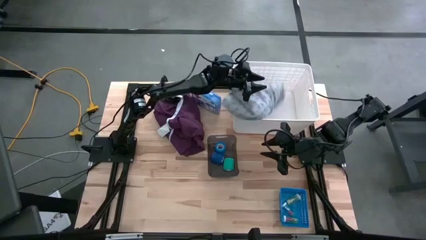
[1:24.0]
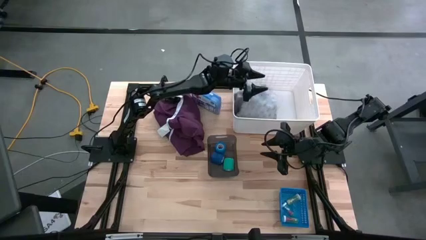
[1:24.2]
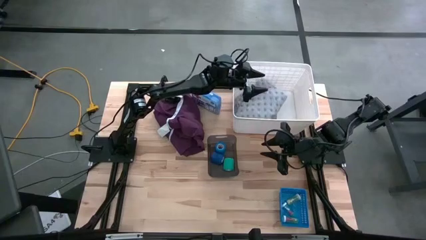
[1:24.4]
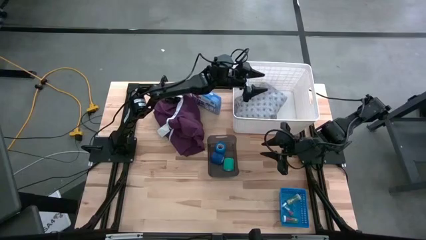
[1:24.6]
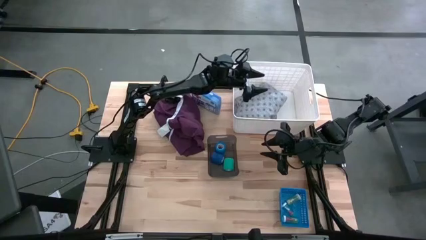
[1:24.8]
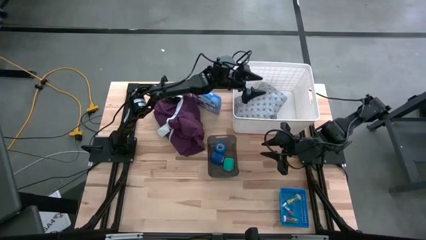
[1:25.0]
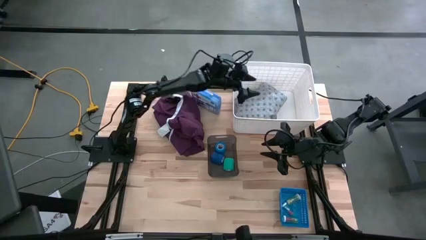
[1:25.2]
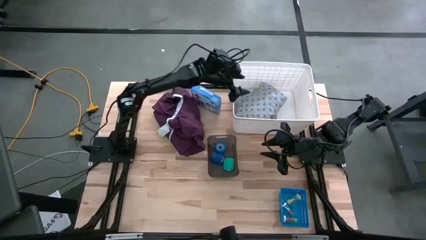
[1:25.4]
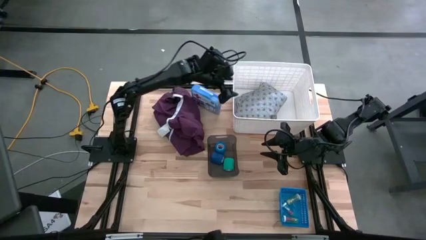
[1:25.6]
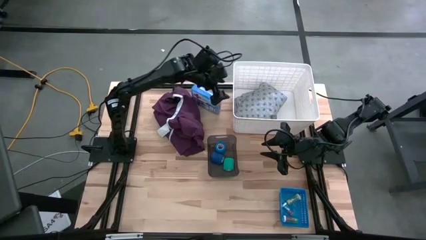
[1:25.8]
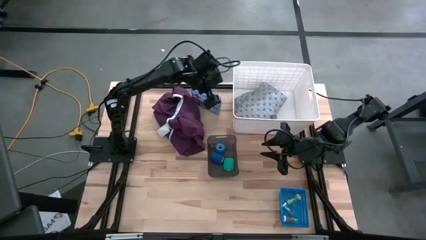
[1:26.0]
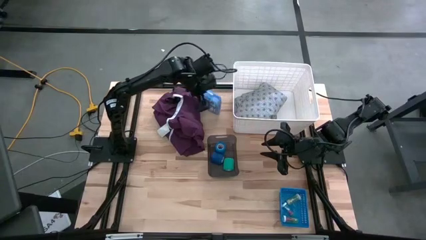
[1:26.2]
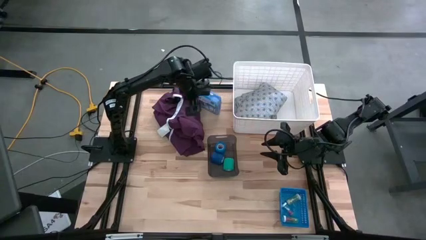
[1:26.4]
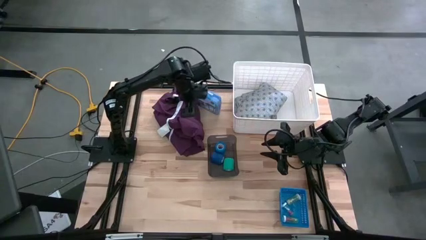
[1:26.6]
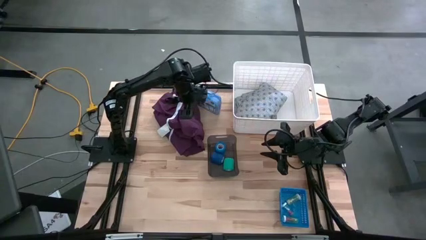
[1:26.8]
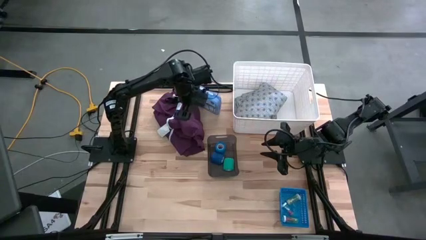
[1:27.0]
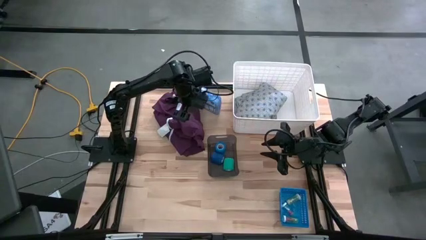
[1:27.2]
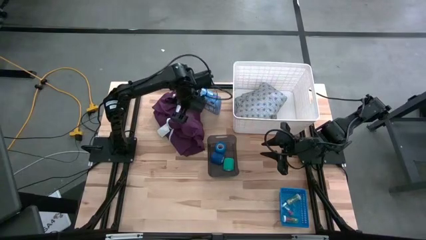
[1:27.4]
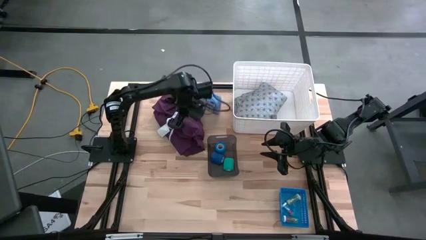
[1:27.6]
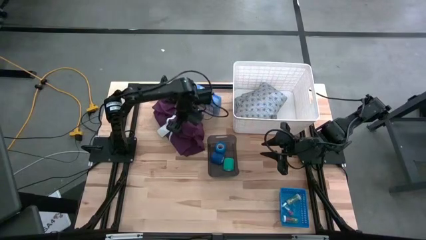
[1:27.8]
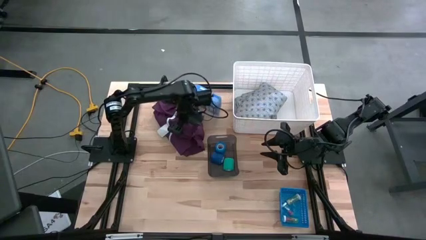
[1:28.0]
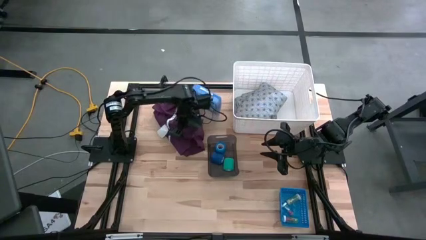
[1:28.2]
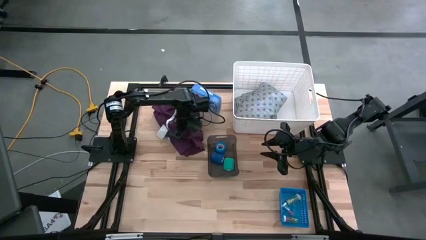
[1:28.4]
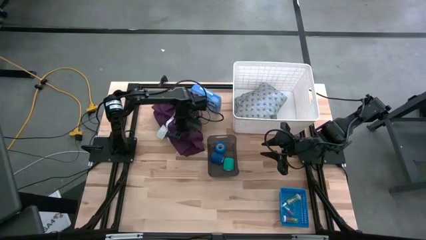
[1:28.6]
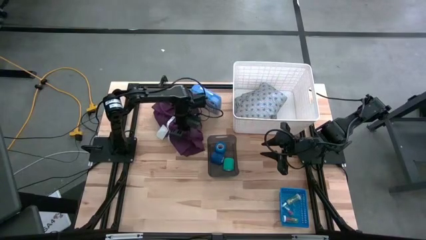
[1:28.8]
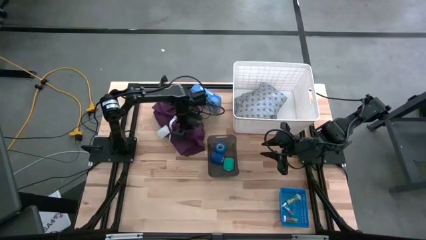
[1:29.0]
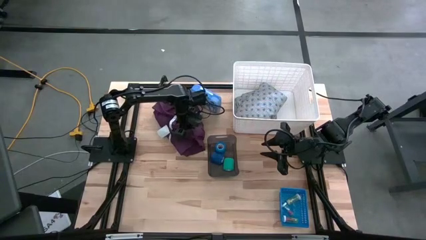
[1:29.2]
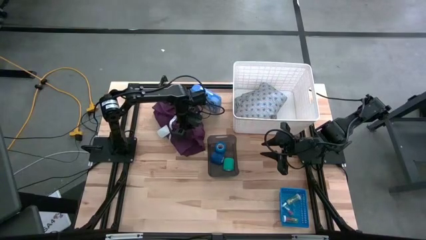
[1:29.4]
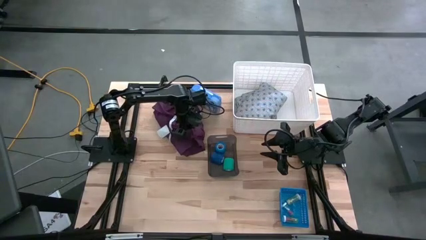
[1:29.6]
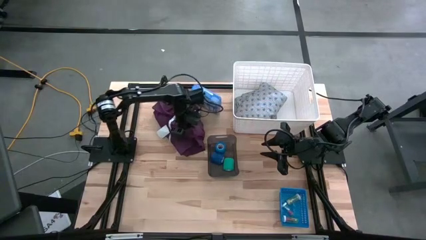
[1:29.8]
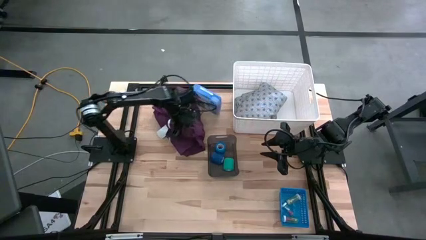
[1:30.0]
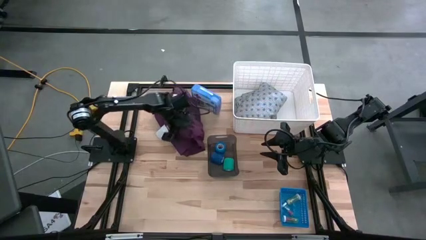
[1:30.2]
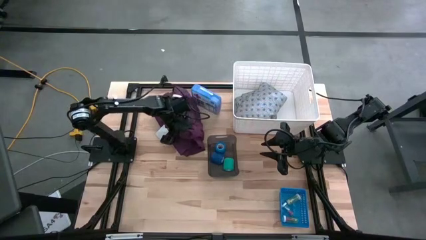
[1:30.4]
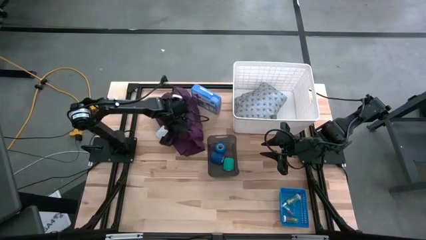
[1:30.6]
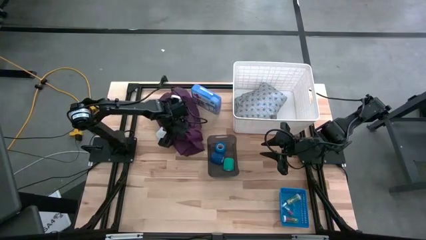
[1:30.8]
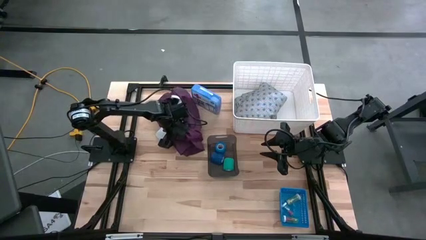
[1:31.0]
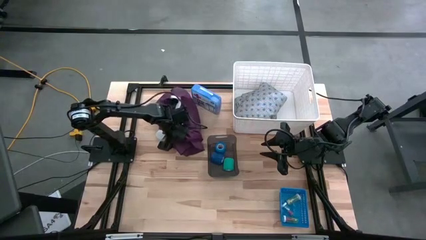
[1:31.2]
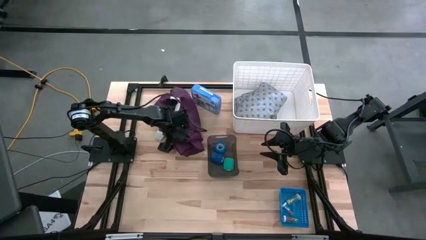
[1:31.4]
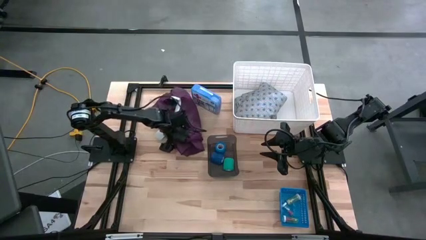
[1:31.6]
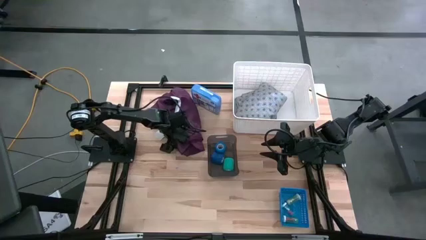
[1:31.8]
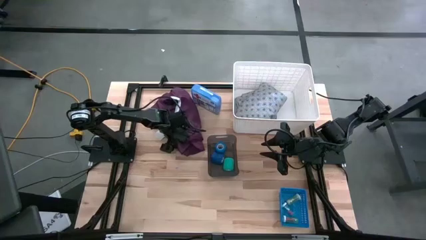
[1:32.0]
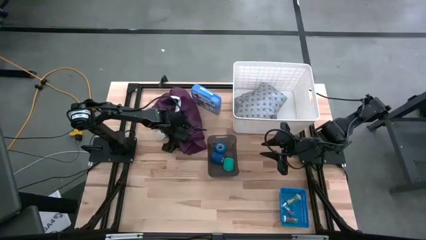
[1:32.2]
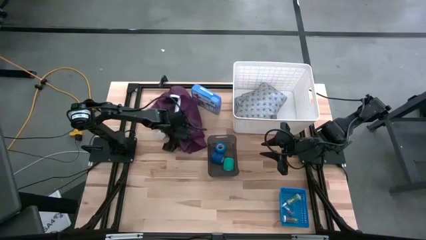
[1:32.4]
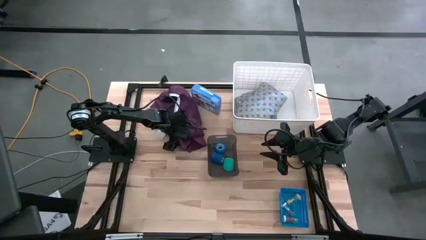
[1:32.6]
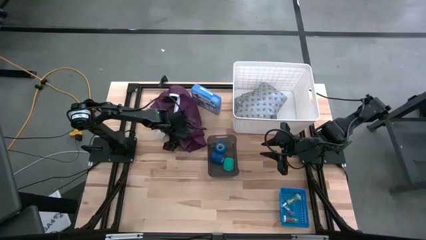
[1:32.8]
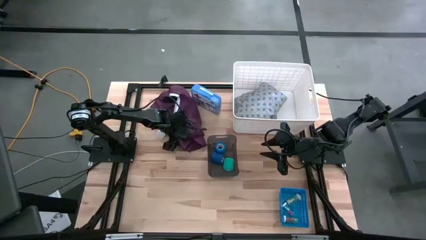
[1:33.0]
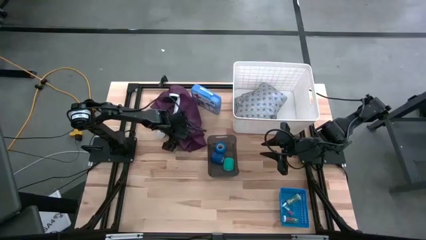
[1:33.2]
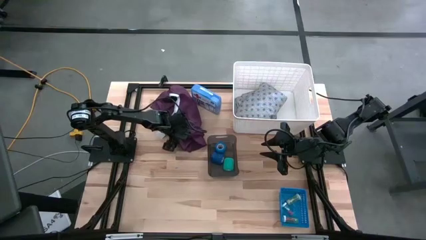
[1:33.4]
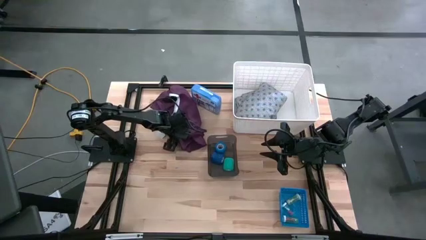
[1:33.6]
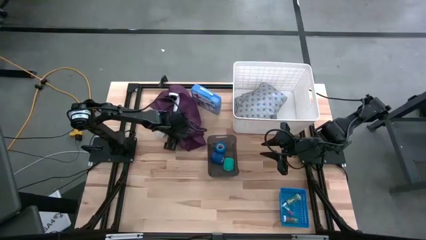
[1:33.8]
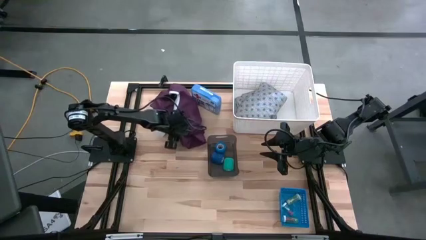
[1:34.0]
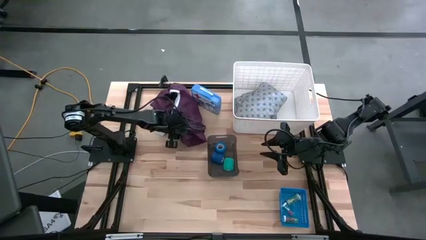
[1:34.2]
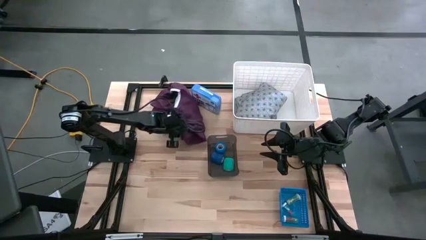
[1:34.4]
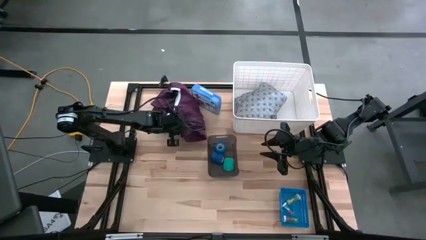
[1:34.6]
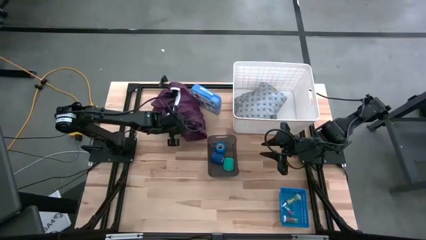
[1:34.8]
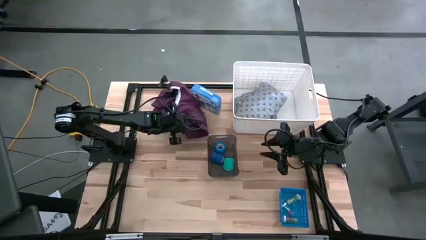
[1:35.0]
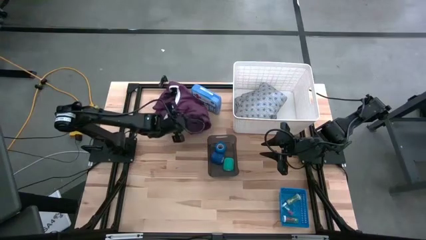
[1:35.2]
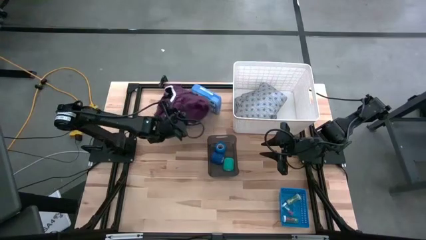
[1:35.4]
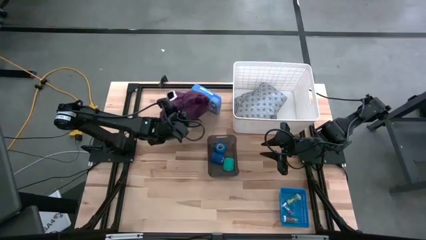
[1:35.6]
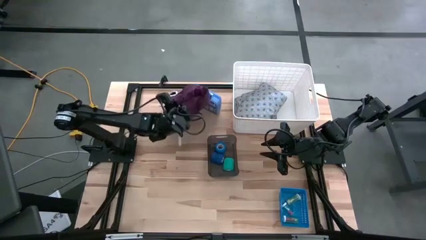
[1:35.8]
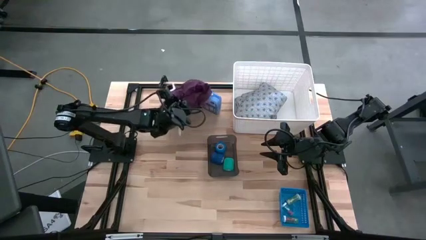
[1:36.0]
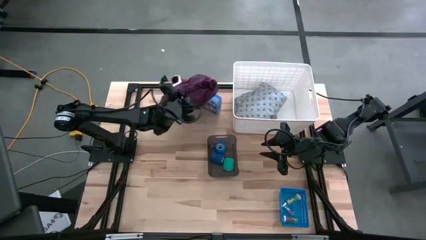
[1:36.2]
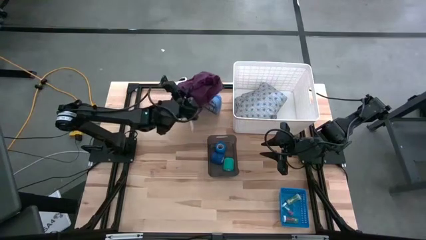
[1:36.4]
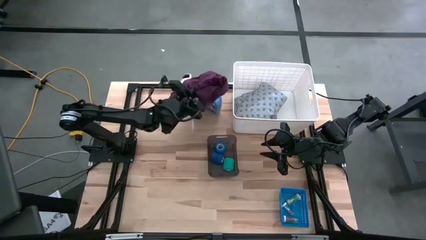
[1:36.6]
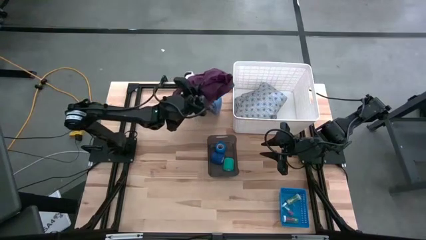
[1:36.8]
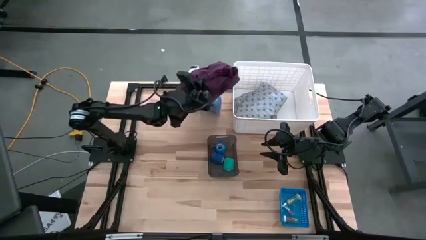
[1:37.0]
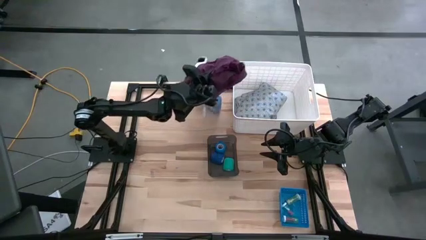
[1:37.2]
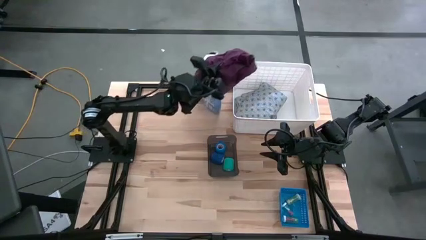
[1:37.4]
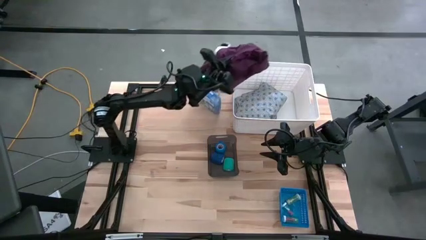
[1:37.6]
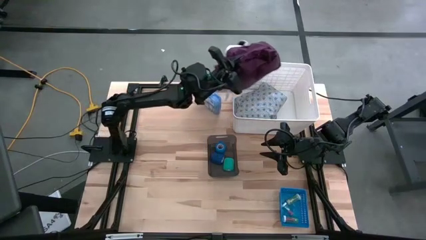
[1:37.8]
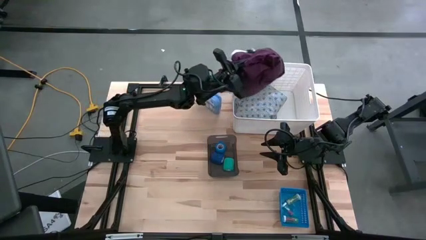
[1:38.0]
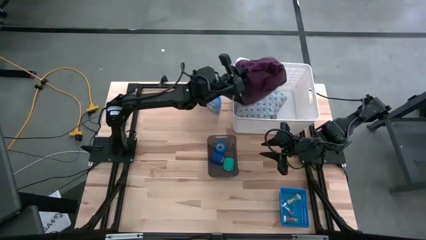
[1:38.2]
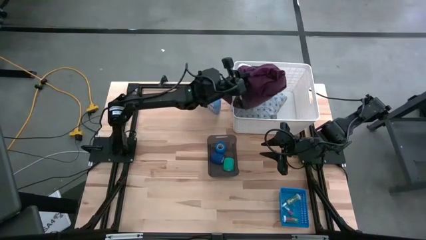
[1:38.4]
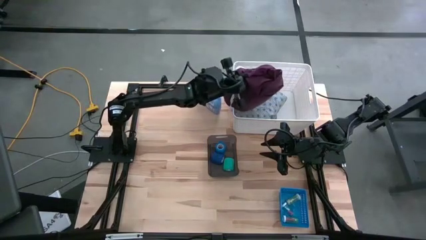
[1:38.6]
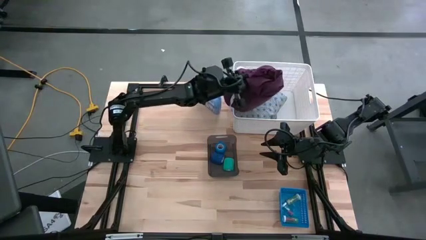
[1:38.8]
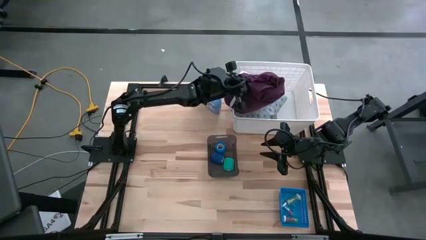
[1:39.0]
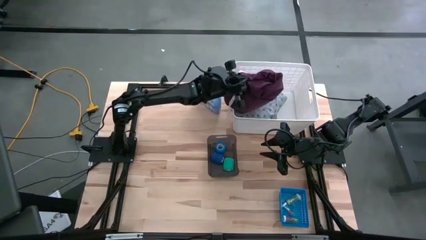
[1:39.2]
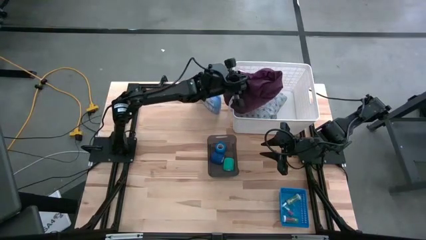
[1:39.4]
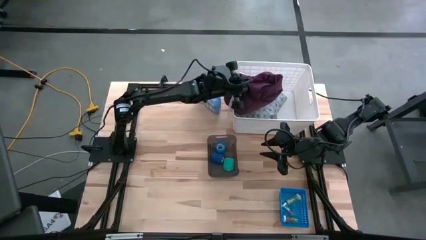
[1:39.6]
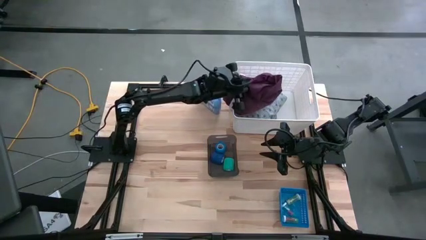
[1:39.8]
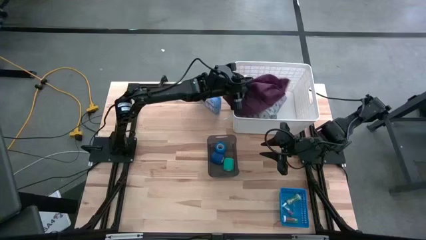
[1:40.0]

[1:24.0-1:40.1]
Task: Pick & Place Medicine items
Put the violet patient gown into the white laundry bin
